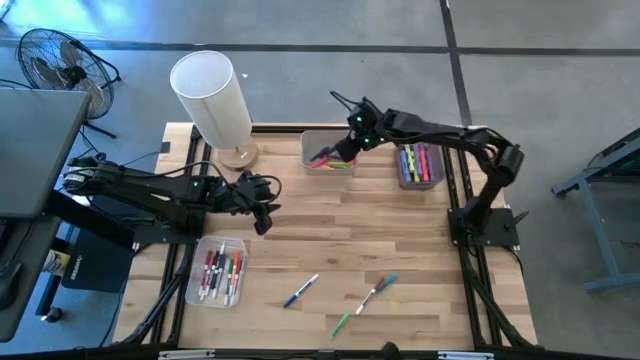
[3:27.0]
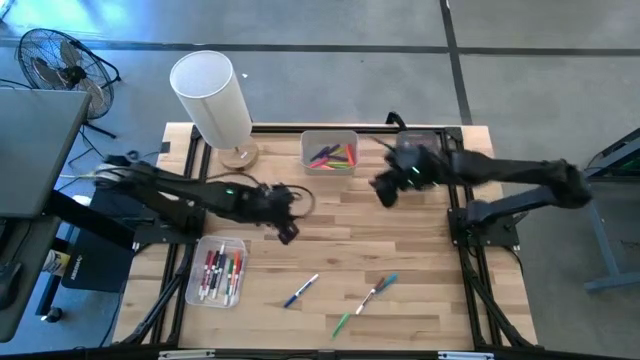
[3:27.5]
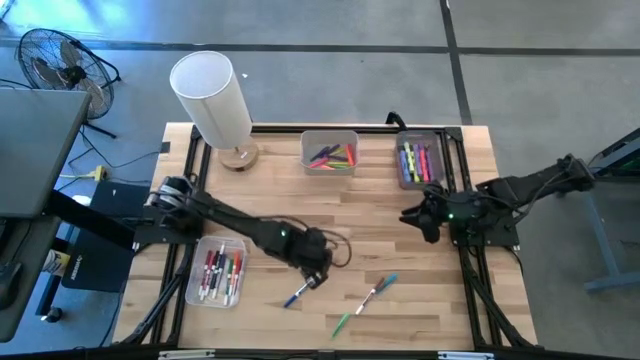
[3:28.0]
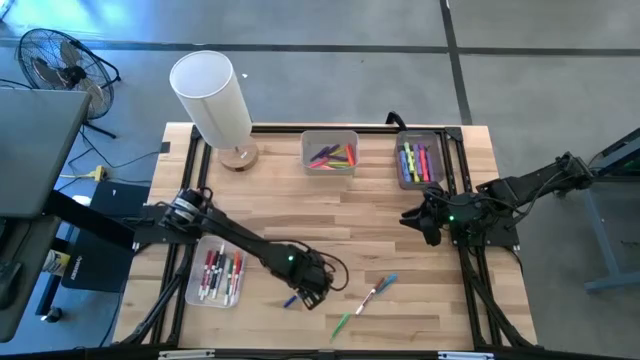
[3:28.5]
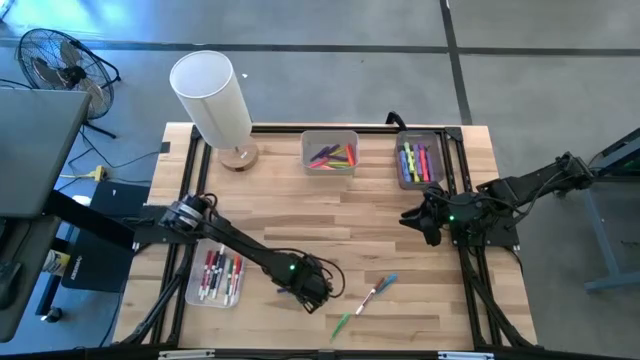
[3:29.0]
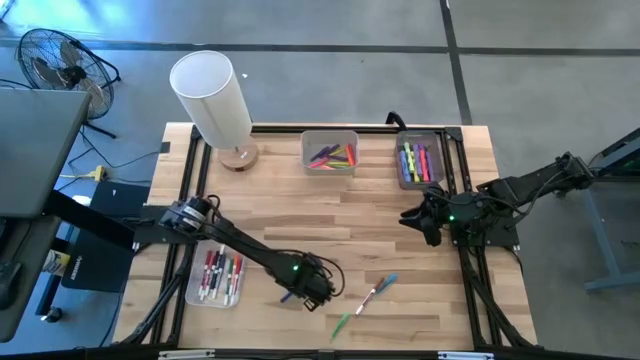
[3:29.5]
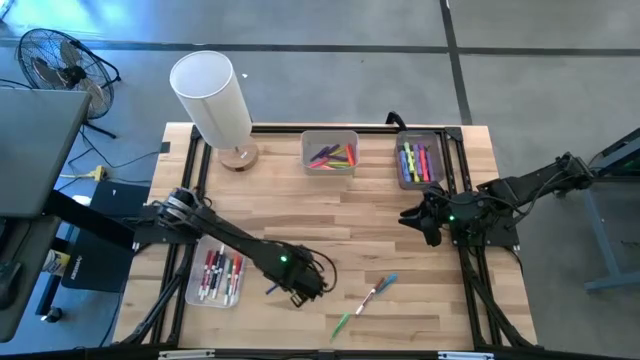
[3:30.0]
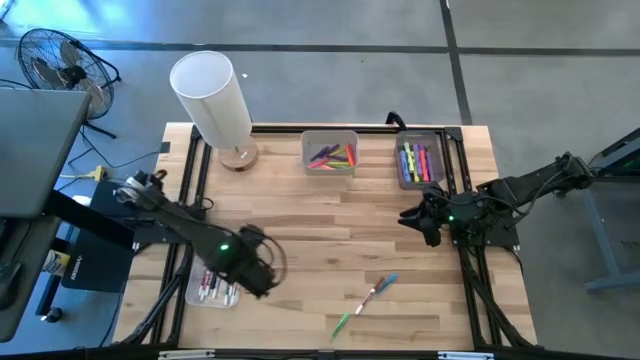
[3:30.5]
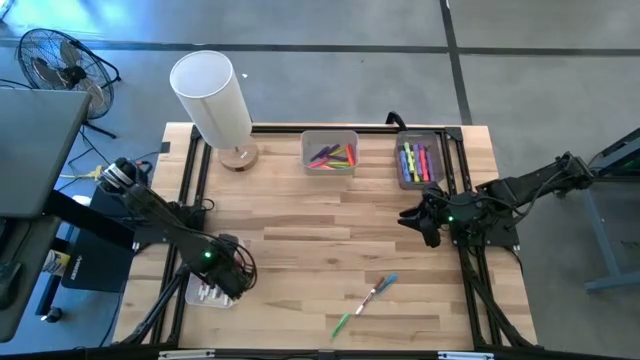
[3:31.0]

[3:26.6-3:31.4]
Task: Pick & Place Markers
Put the light blue marker pen into the transparent bin

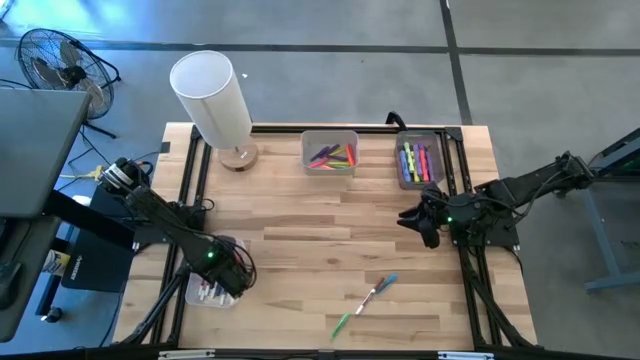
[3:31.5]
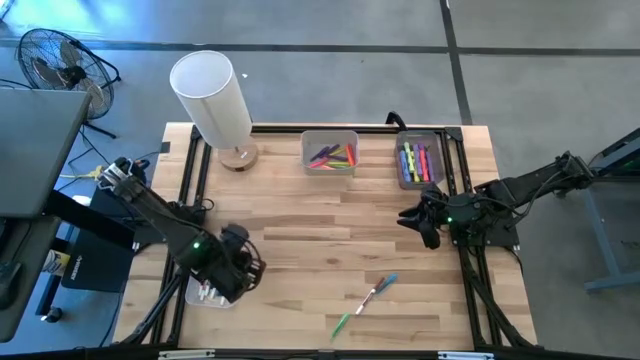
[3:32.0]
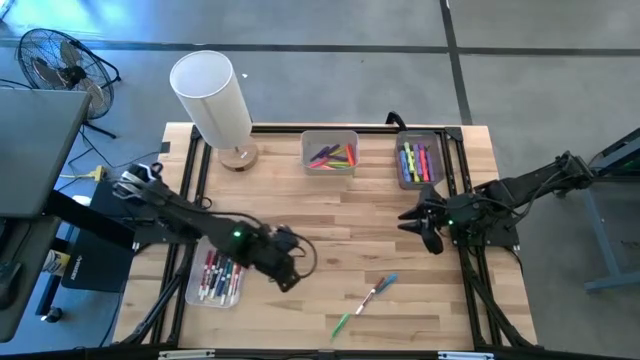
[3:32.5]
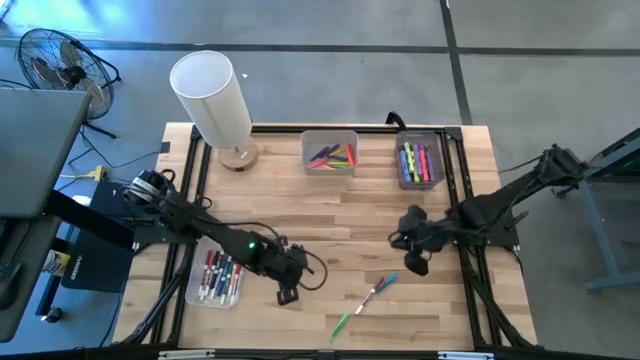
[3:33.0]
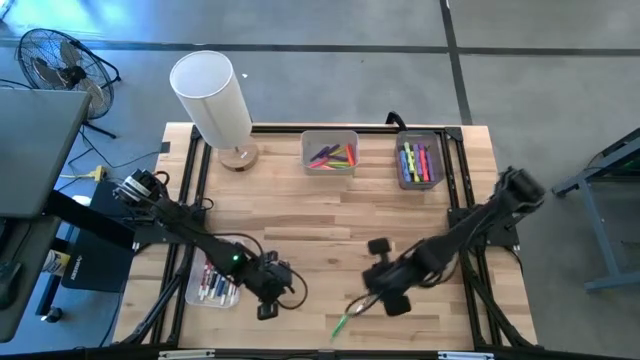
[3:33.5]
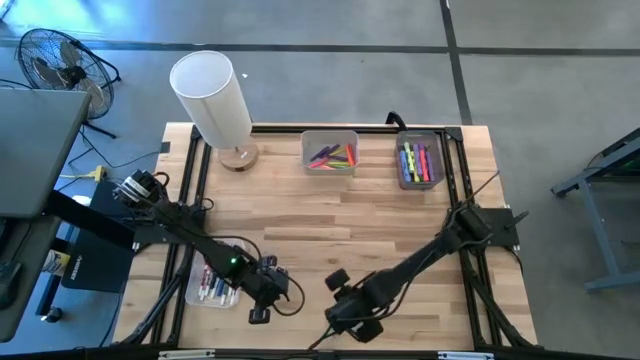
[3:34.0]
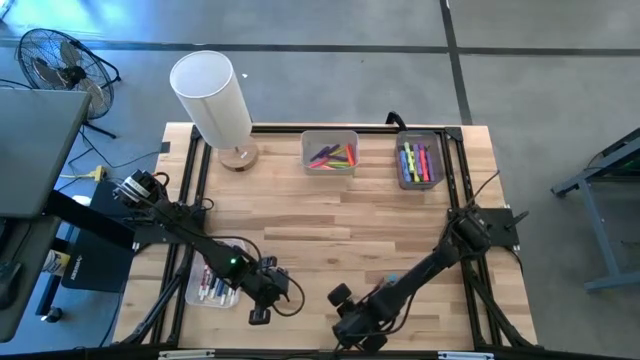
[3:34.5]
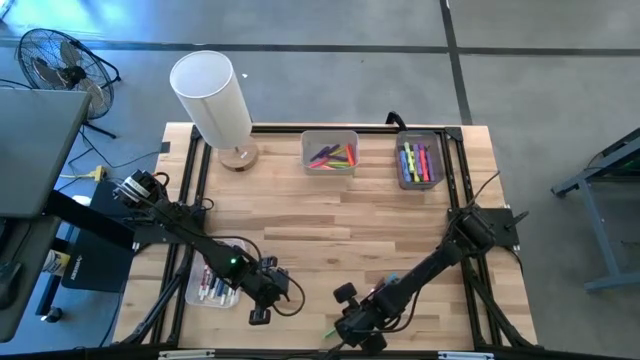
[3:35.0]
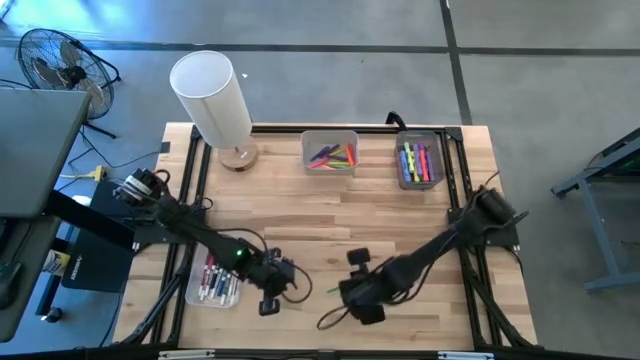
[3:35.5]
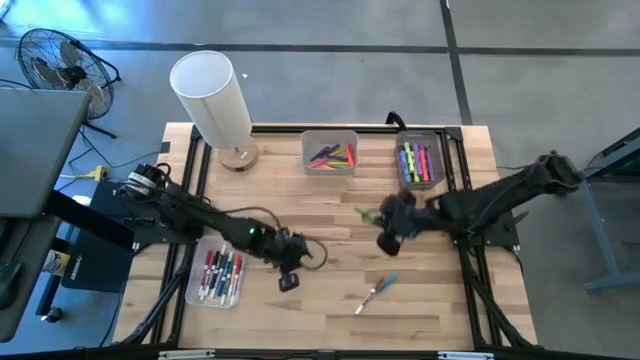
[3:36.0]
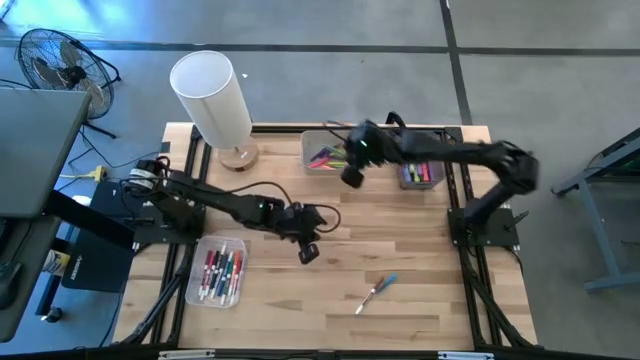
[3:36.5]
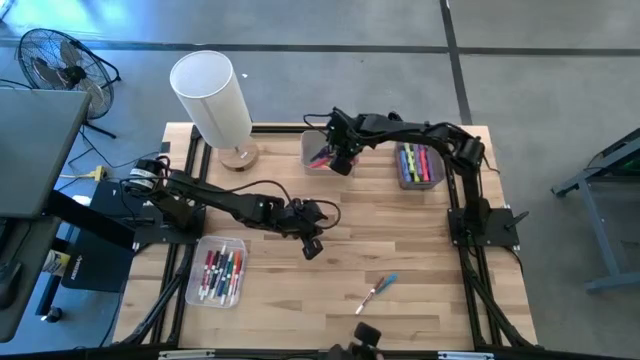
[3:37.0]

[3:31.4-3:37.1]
Put the green pen into the white bin

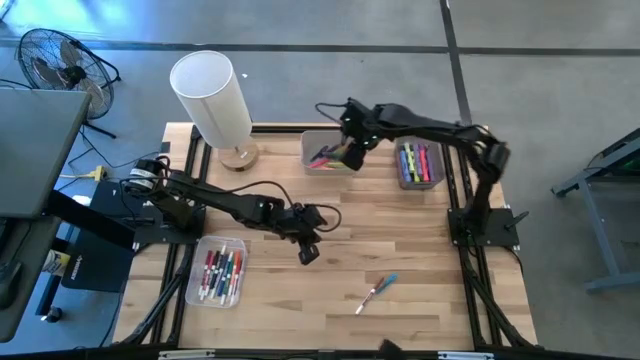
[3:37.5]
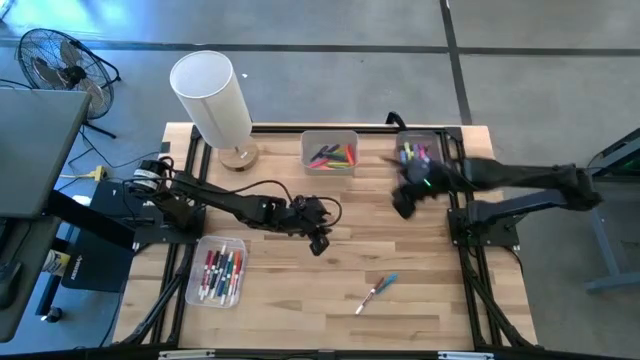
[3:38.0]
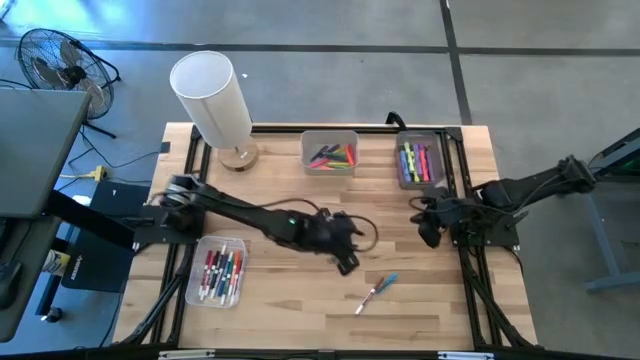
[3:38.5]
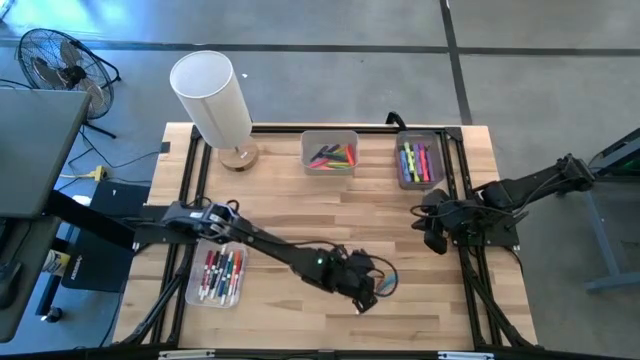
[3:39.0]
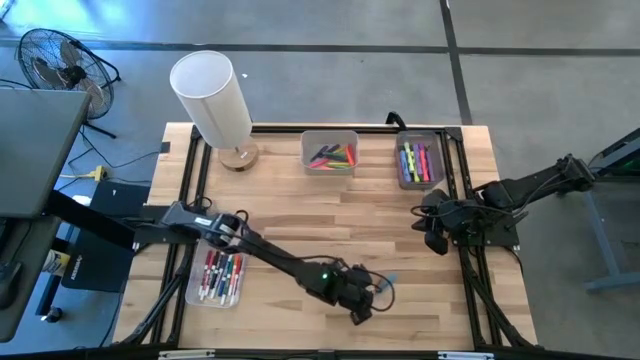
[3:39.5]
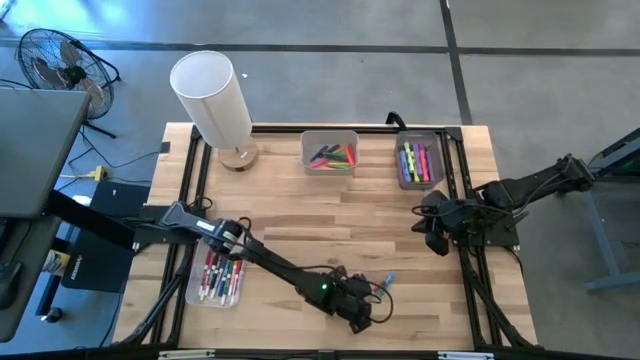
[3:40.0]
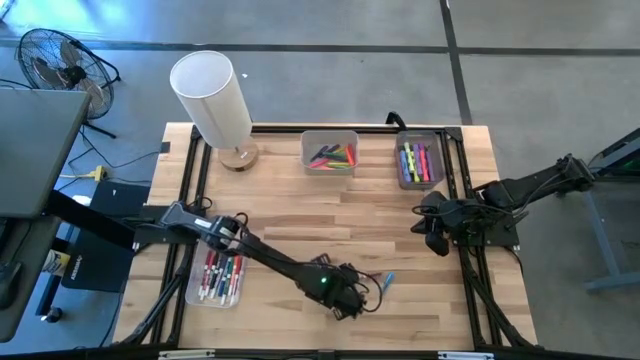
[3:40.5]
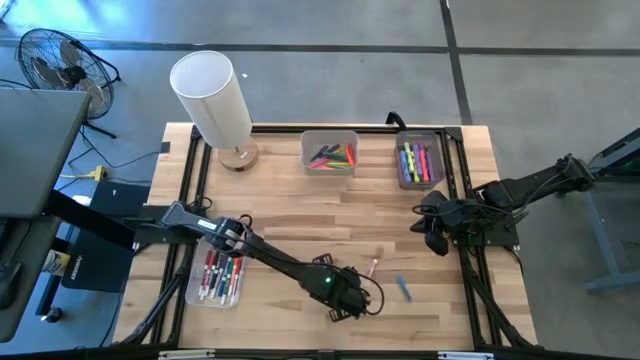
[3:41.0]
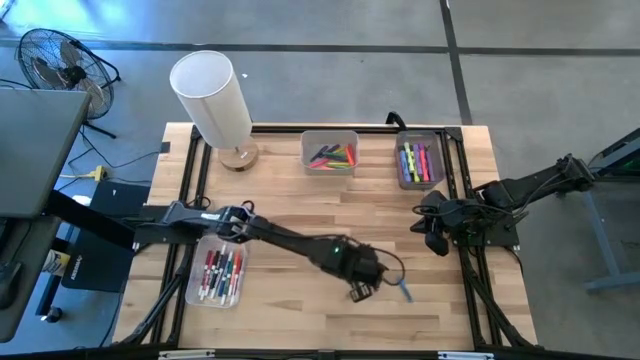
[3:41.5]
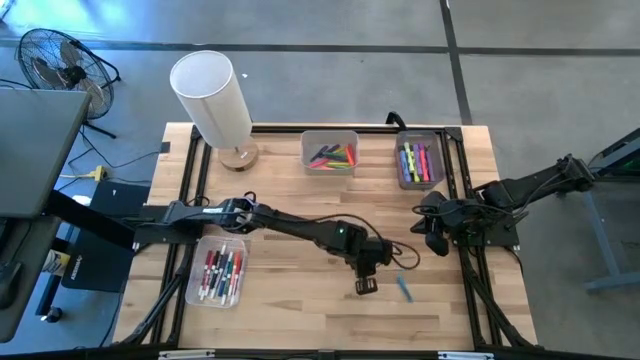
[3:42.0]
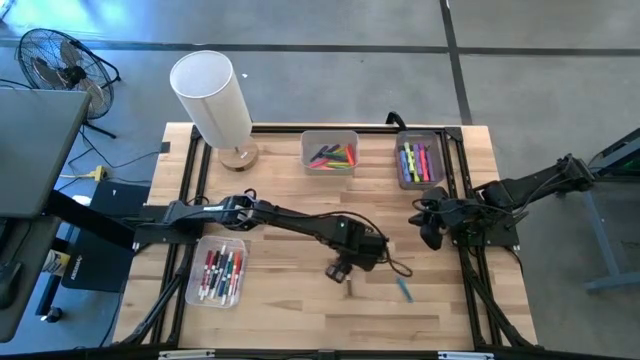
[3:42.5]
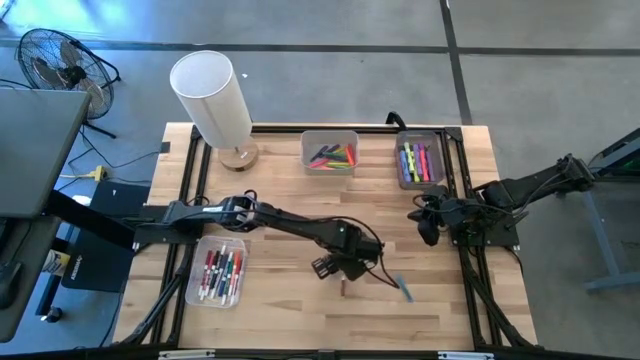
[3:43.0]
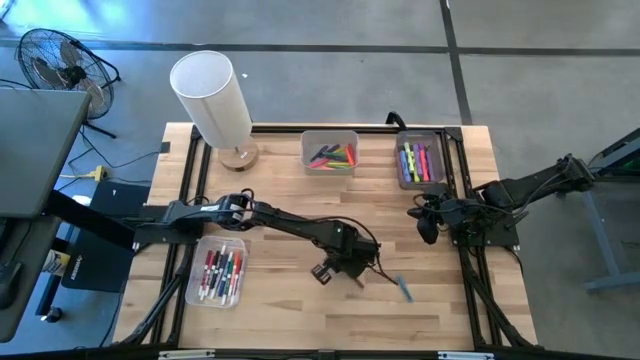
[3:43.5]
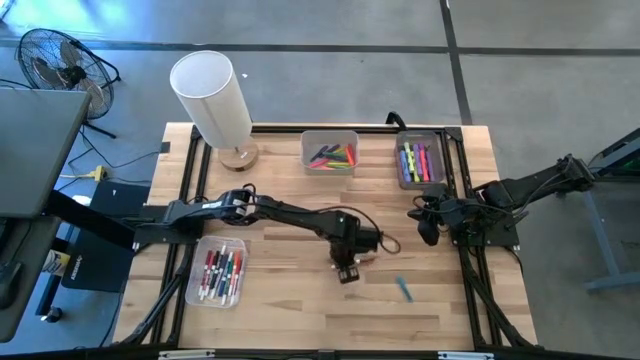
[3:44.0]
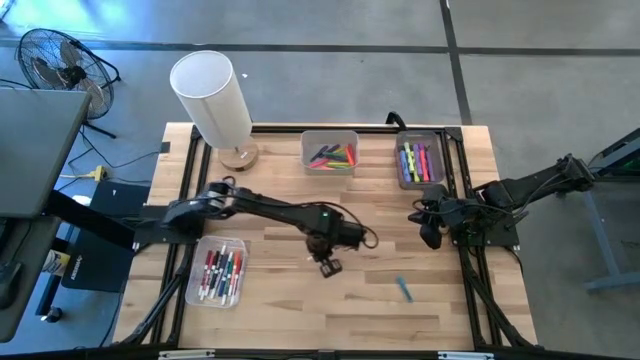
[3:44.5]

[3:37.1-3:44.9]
Put the blue pen into the white bin

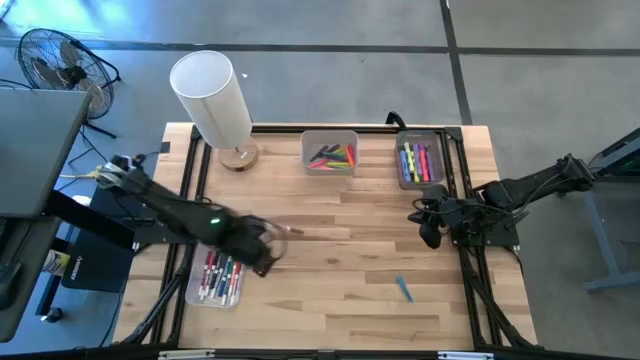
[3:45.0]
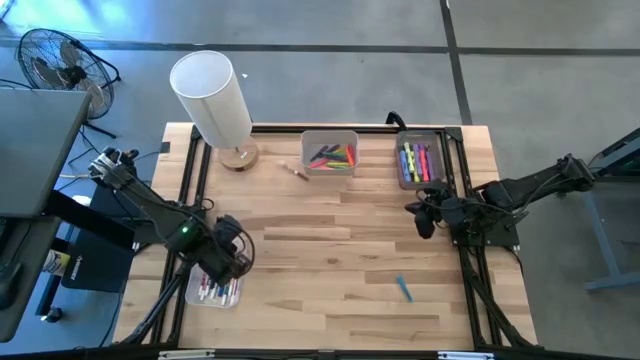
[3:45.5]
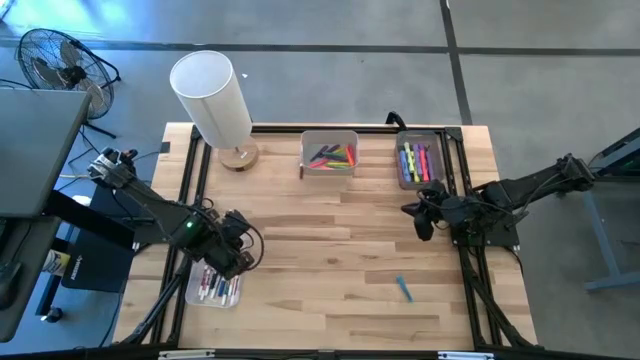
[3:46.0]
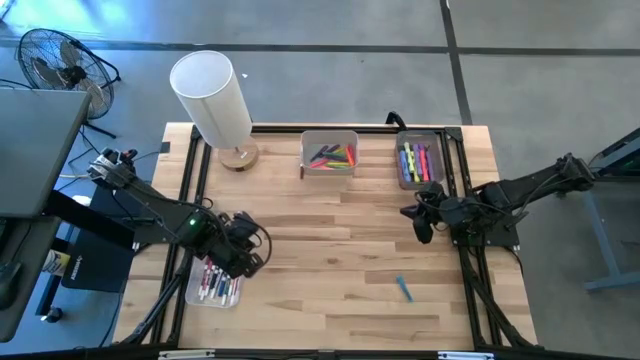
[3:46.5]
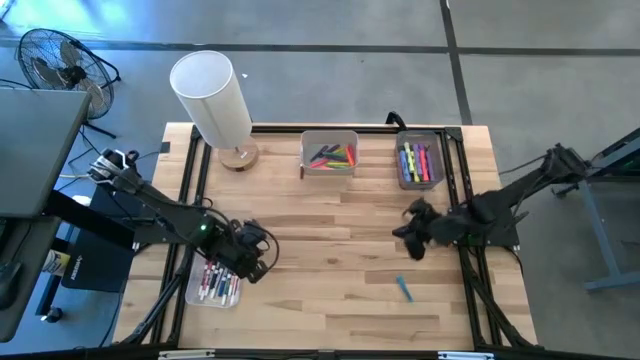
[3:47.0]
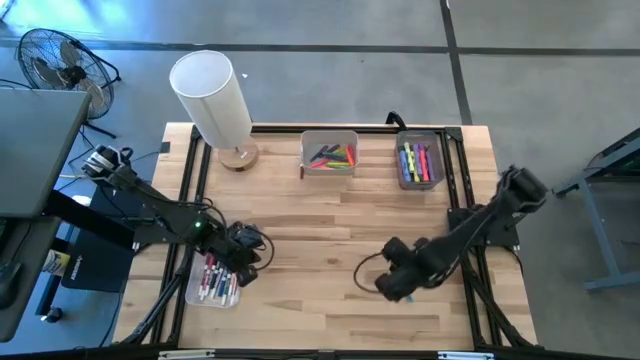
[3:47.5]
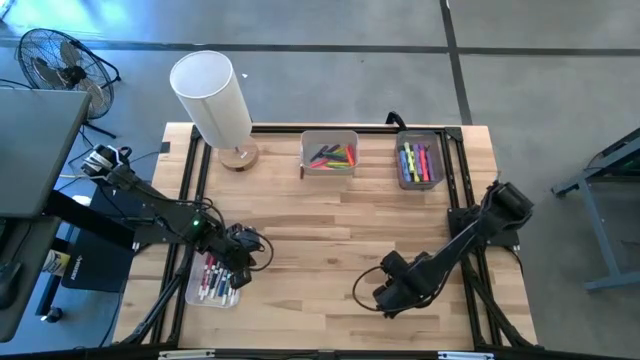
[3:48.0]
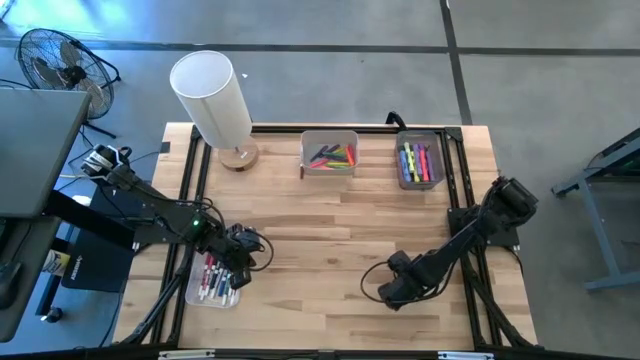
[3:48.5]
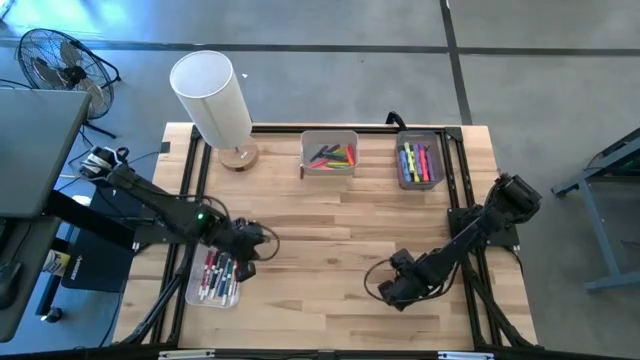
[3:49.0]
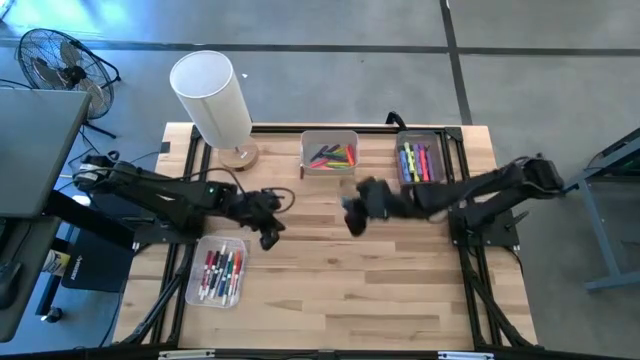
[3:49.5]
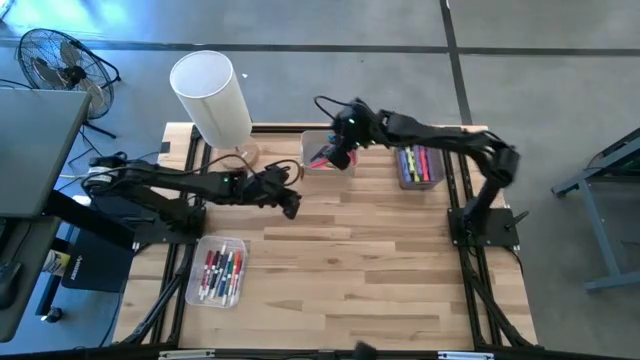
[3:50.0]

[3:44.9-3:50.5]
Put the blue pen into the white bin
